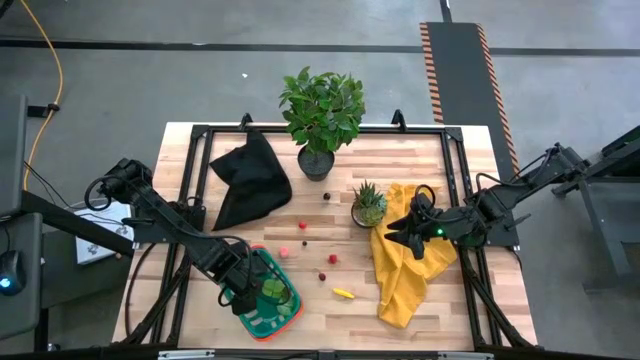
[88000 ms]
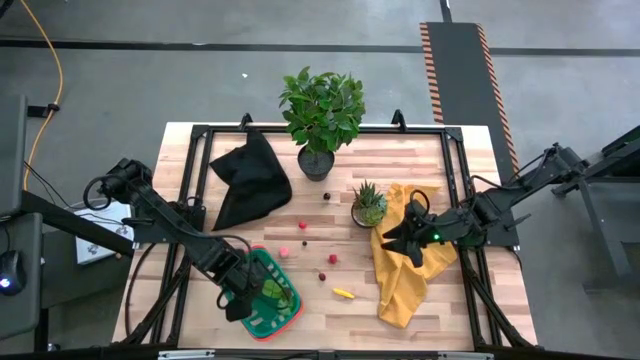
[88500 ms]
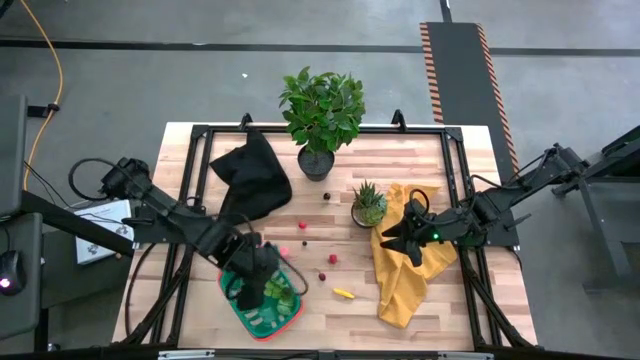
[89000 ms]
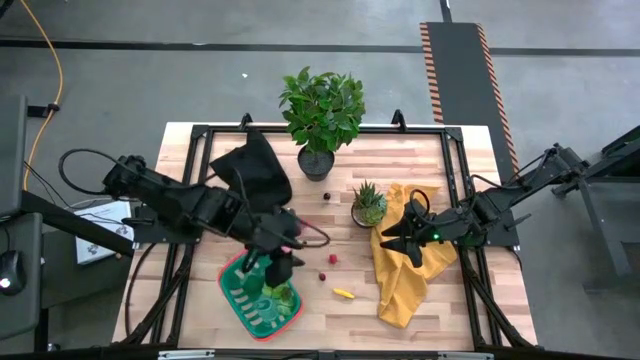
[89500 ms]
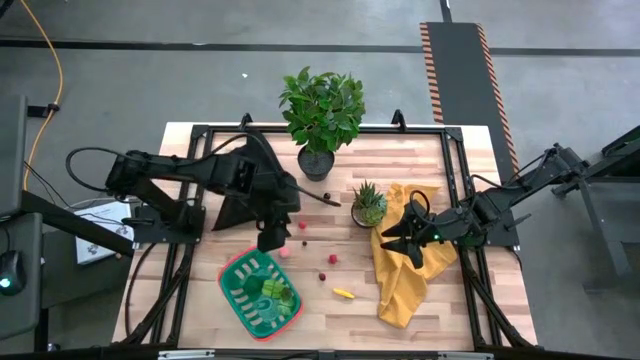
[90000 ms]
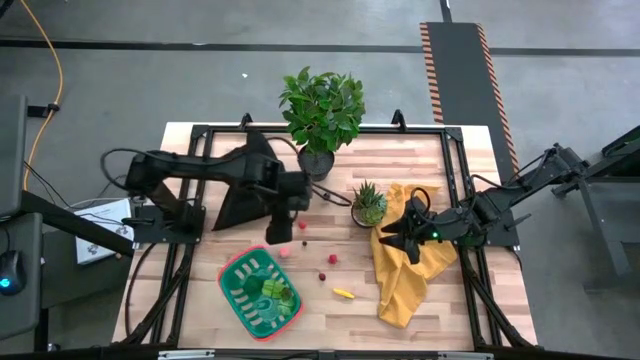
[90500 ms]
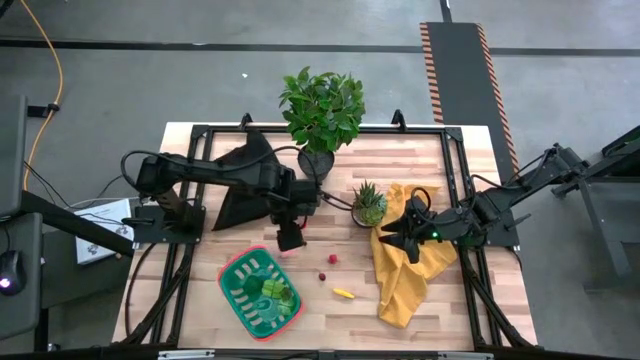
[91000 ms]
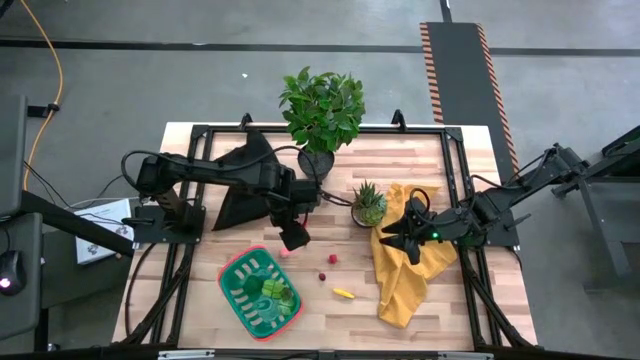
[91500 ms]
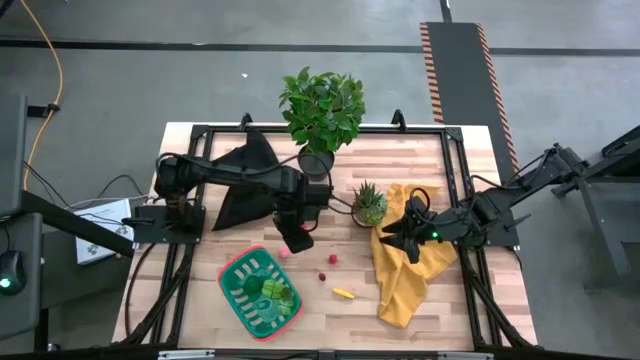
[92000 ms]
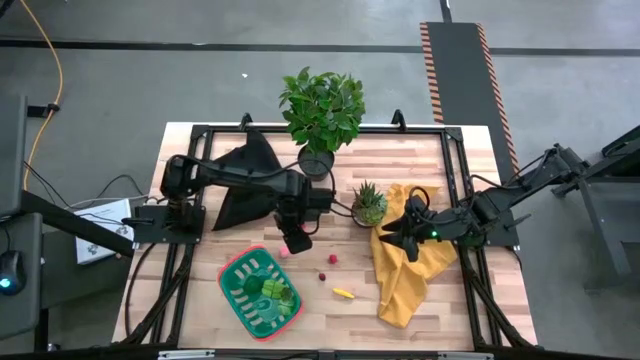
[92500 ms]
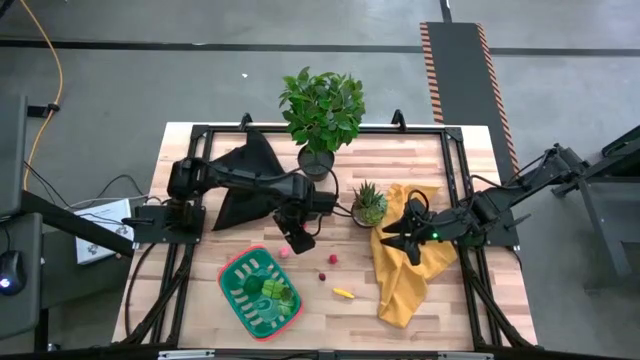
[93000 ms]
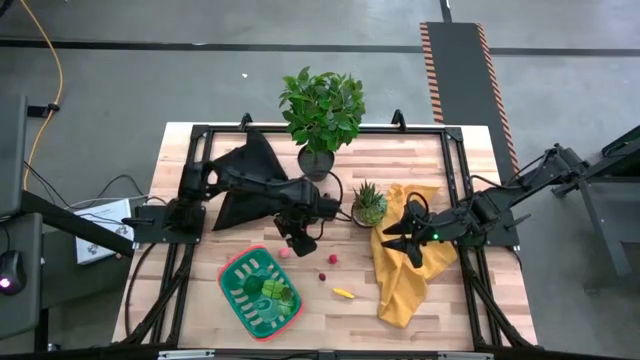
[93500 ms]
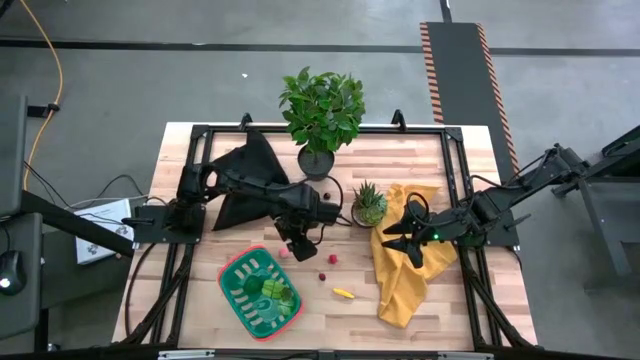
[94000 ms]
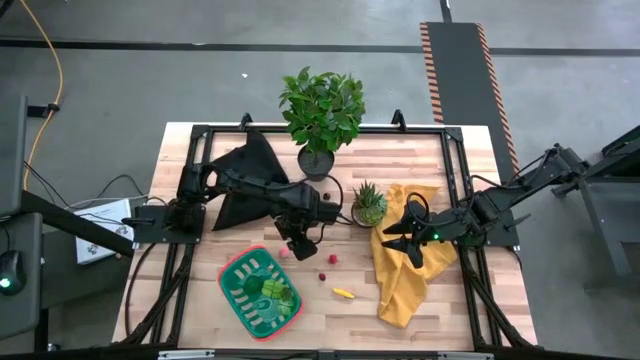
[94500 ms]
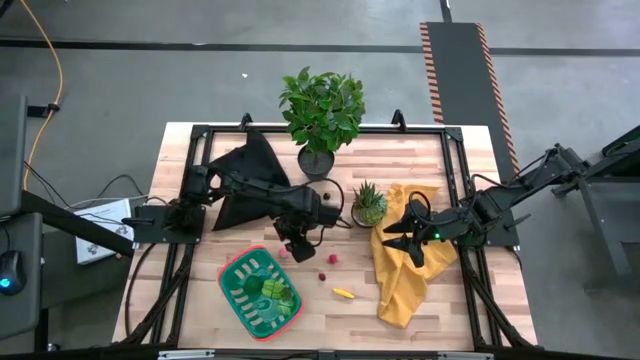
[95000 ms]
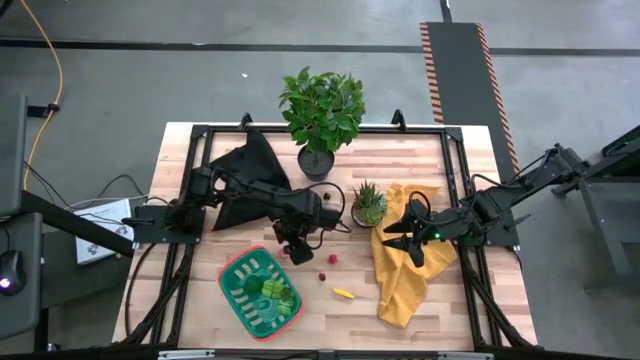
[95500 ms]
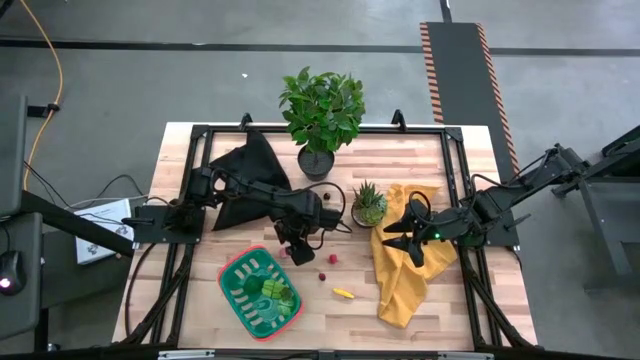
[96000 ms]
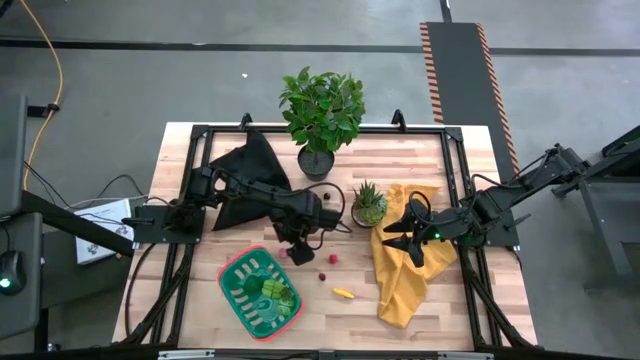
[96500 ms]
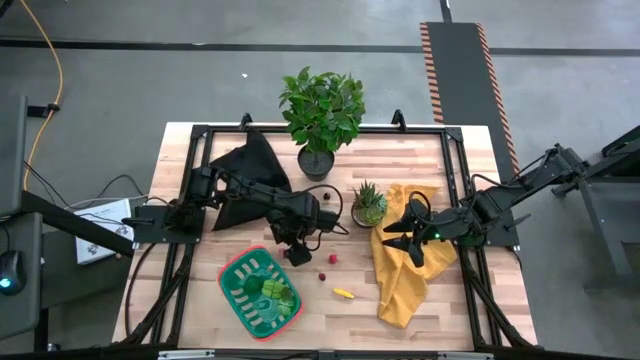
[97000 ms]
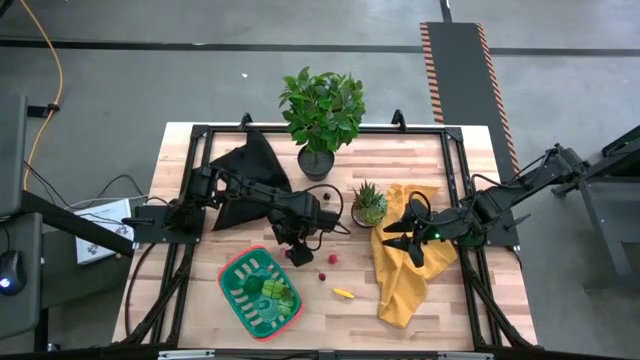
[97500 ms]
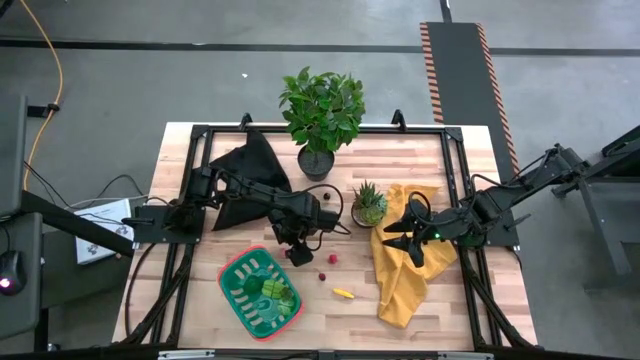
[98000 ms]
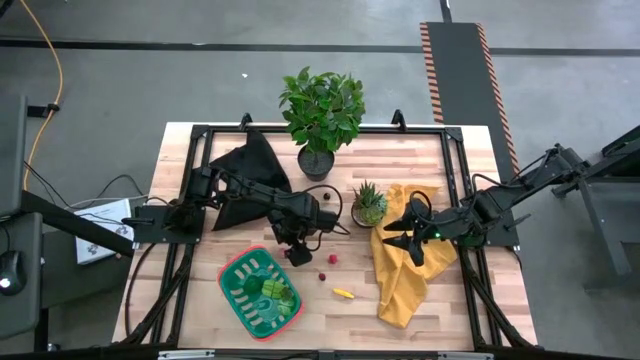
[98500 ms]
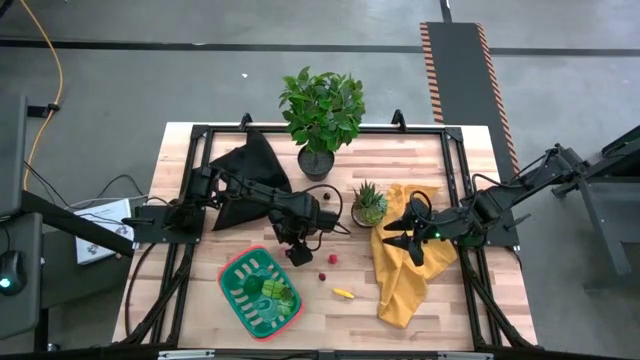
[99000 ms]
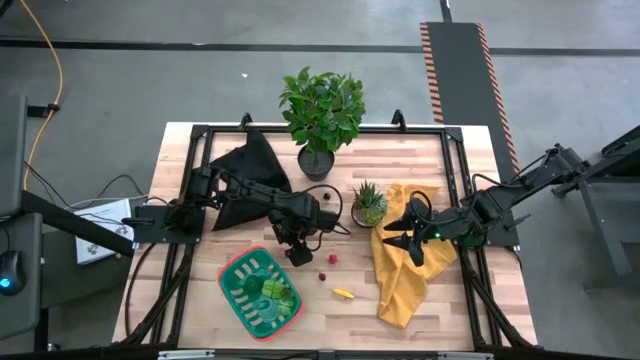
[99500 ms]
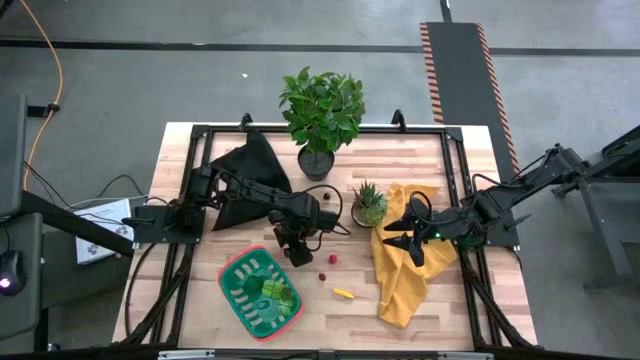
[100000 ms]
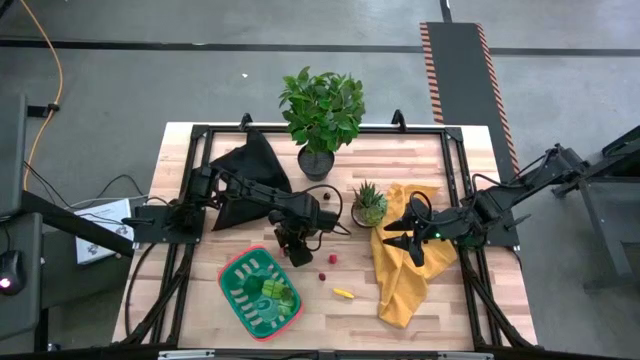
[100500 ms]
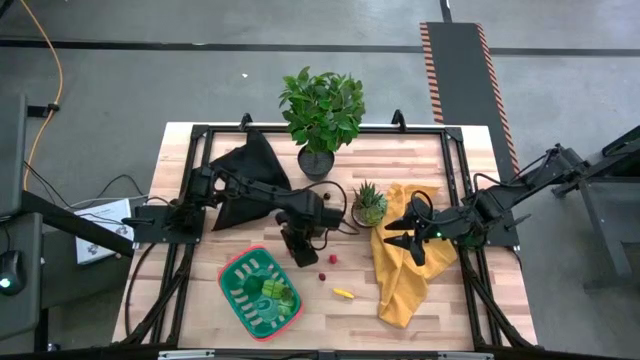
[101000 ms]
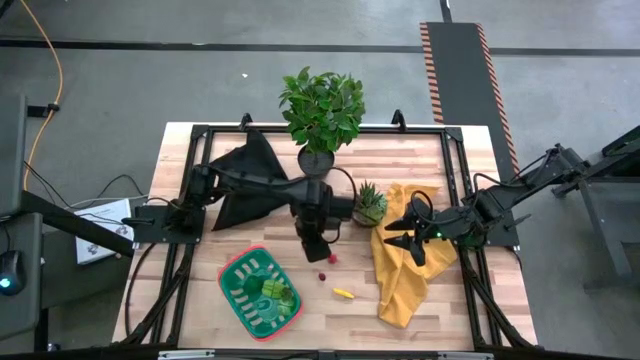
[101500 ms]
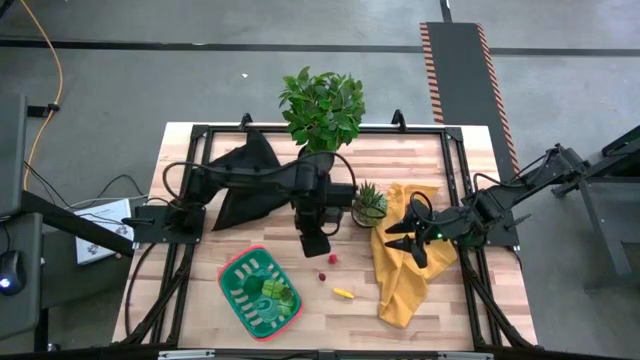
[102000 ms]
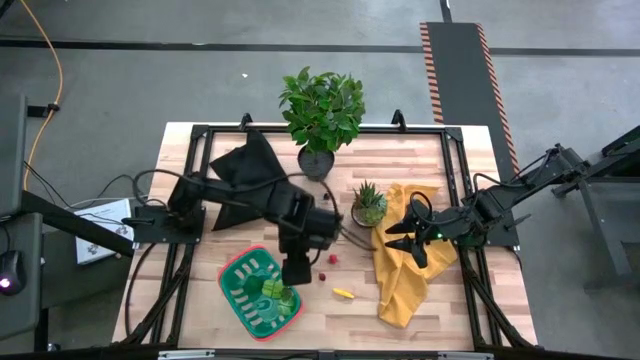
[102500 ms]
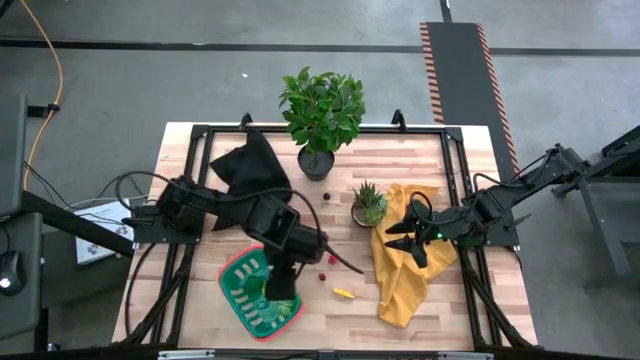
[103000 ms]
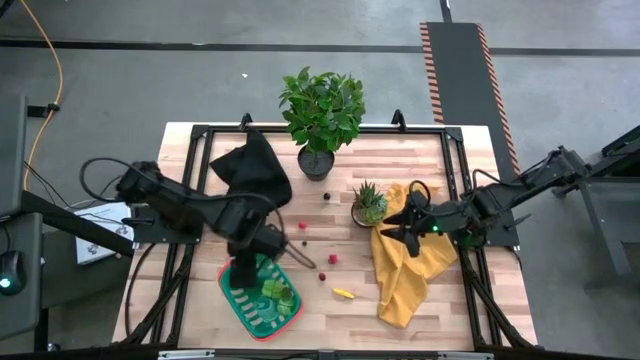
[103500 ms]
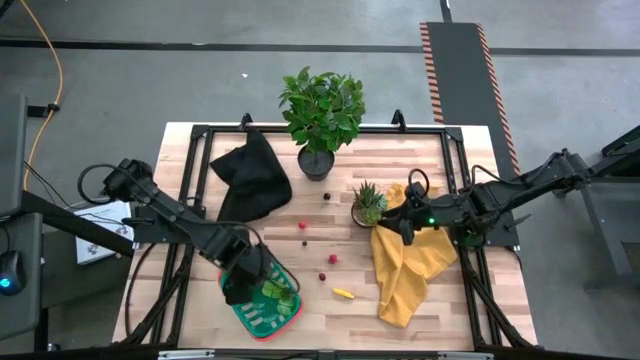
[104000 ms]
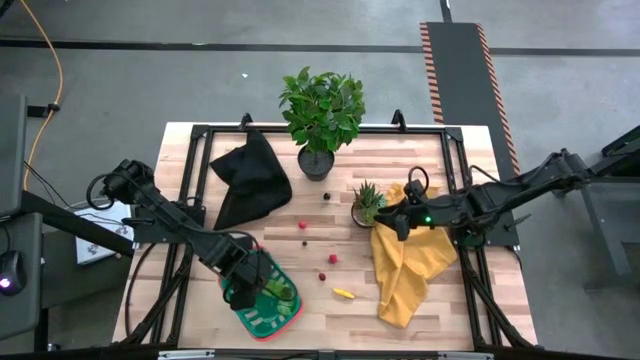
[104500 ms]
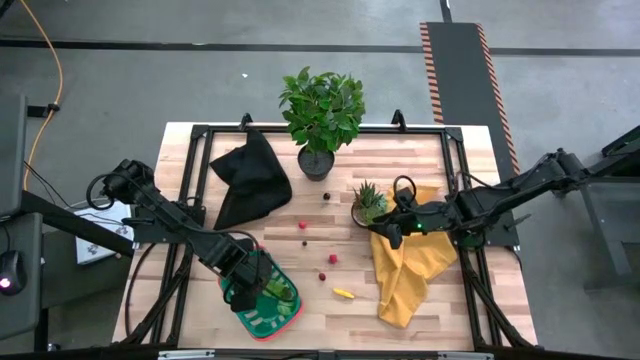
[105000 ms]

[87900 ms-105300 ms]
Task: Pick and placing Produce into tupperware
Put the pink peach into the blue basket

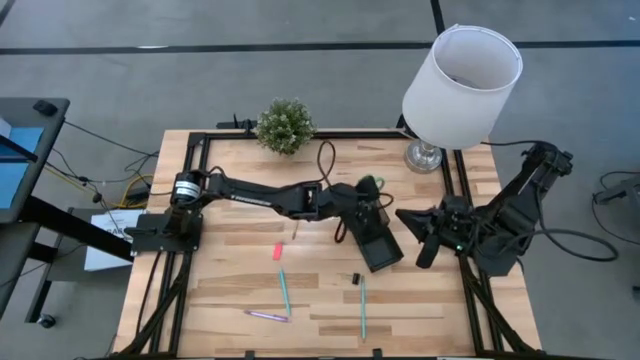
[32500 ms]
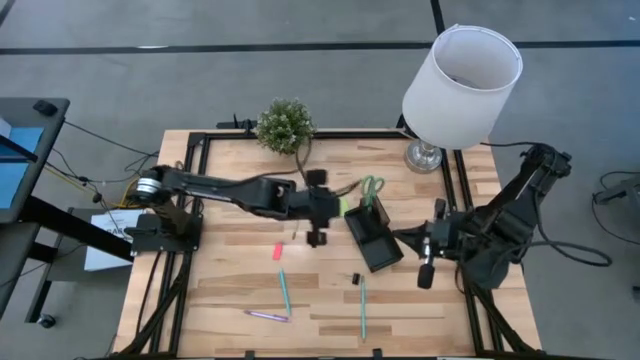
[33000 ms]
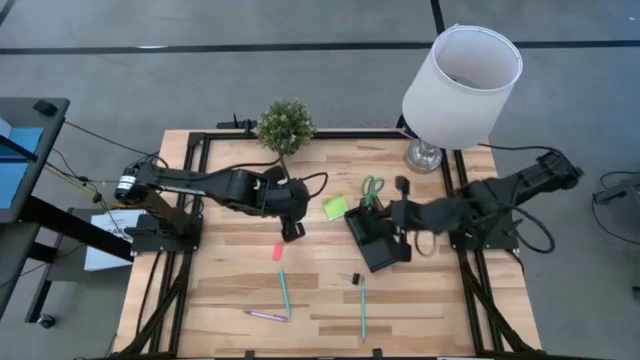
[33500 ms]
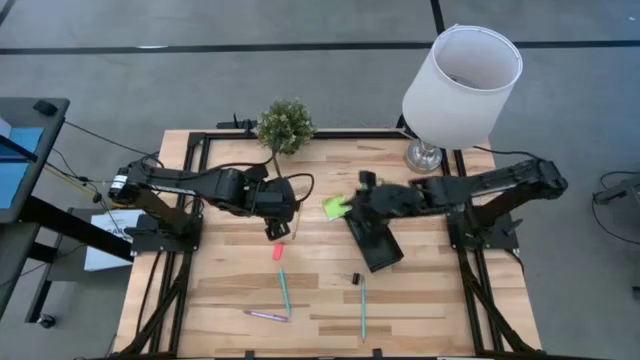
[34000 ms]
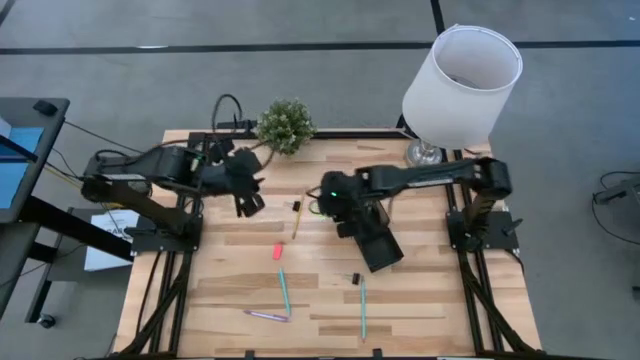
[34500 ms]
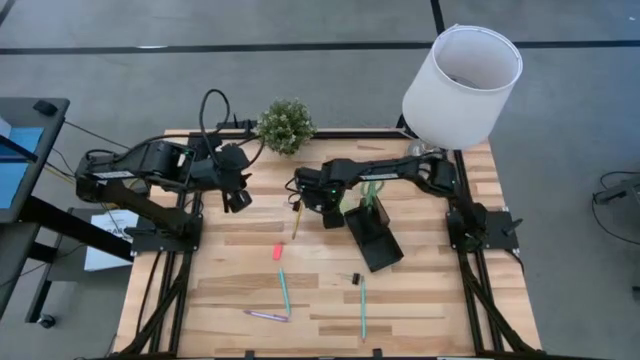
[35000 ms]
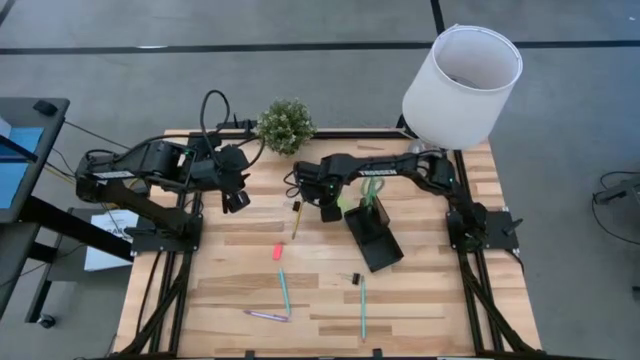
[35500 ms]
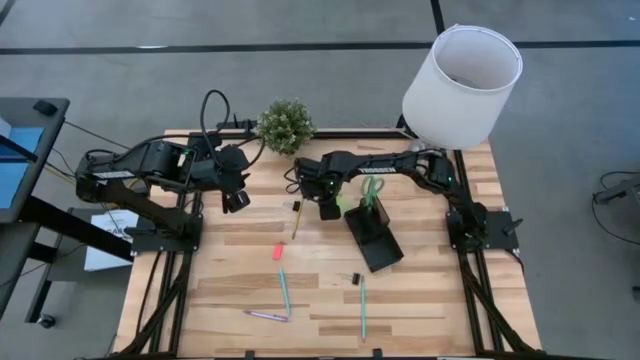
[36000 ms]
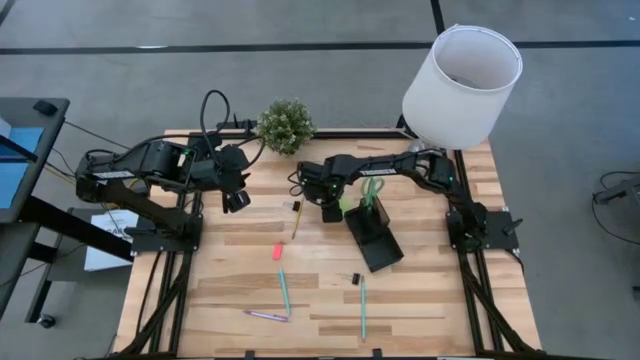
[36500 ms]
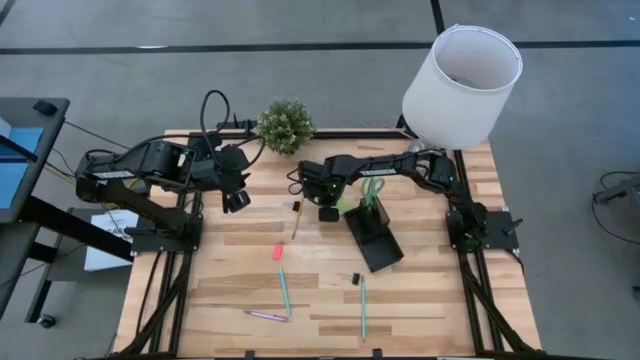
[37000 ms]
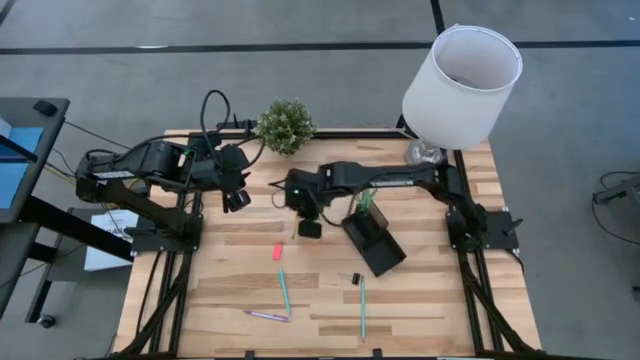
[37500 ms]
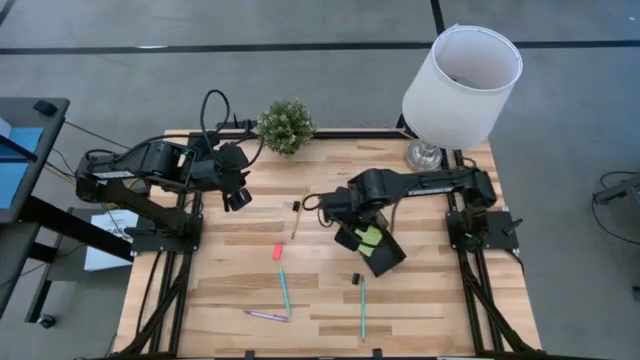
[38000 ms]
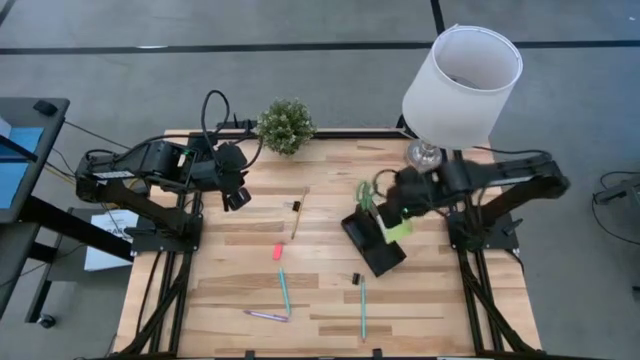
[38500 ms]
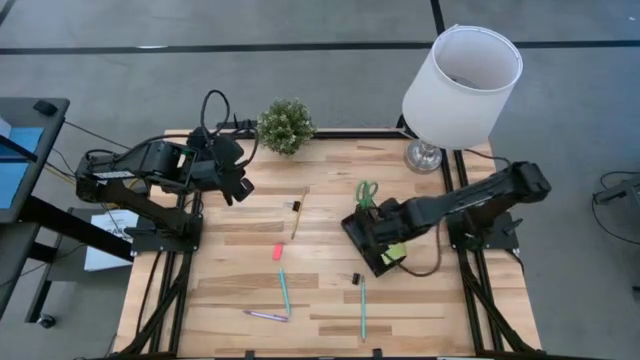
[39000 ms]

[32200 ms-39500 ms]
Task: Pick and place office supplies into organizer
Put the green sticky notes into the black desk organizer
